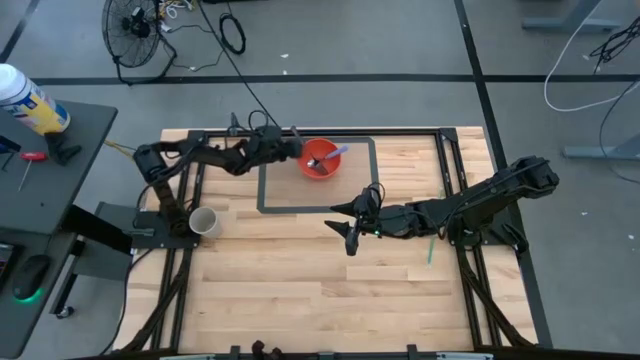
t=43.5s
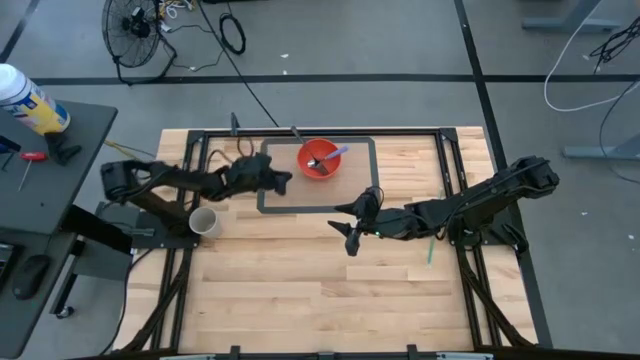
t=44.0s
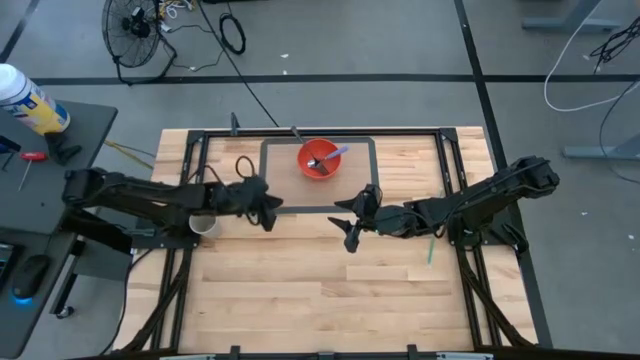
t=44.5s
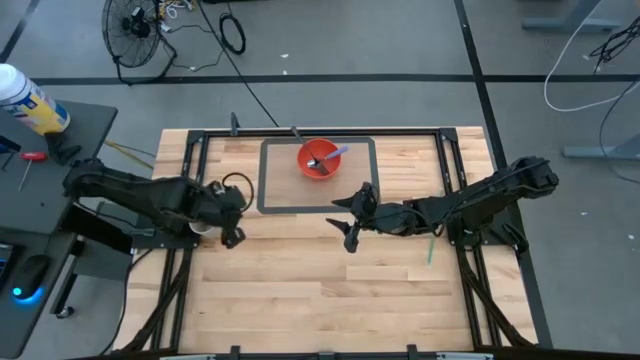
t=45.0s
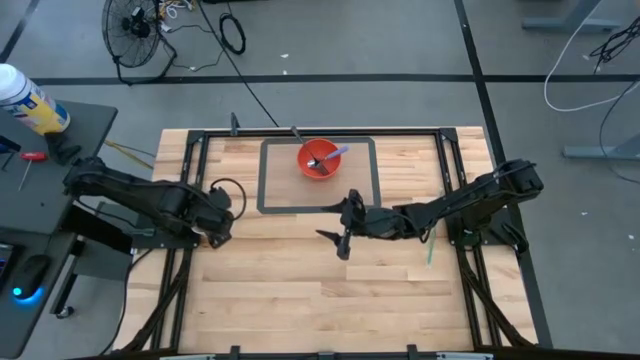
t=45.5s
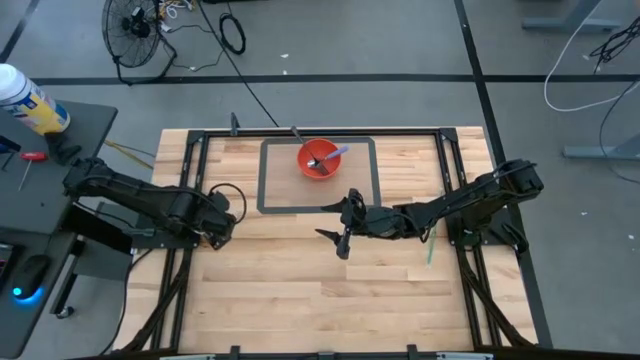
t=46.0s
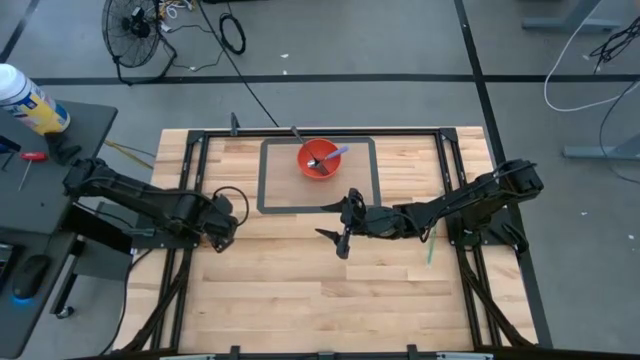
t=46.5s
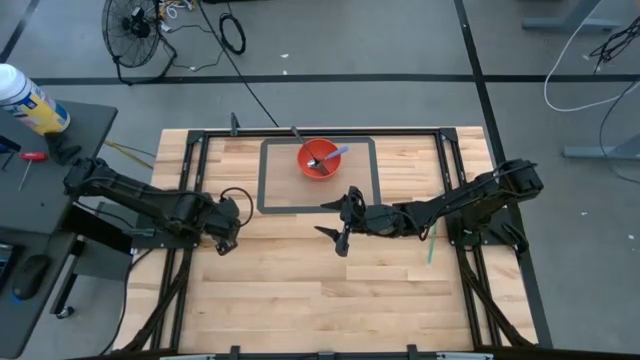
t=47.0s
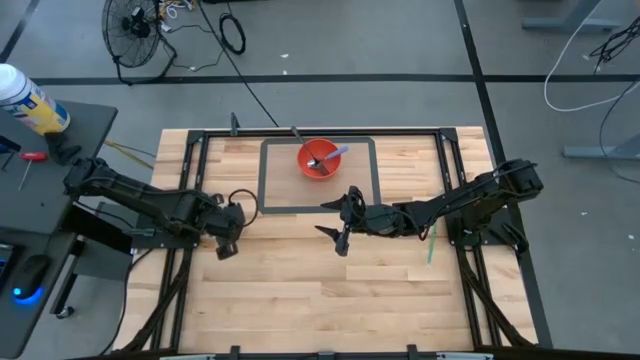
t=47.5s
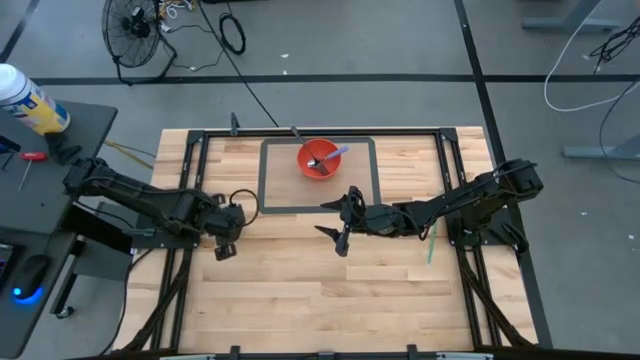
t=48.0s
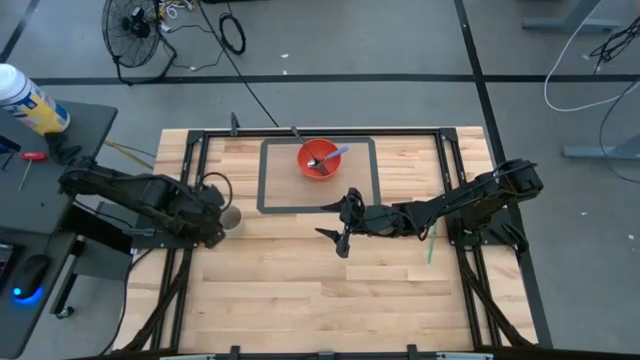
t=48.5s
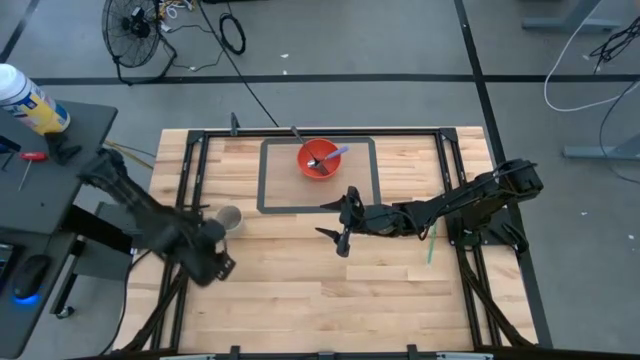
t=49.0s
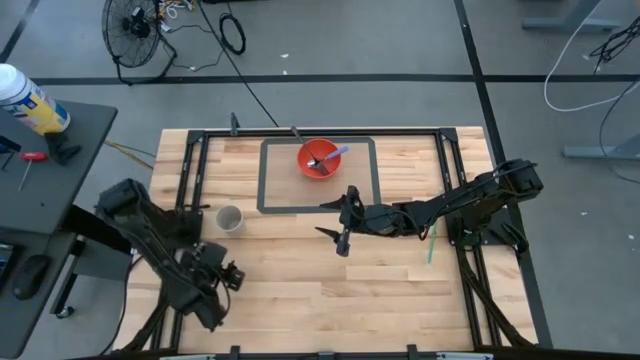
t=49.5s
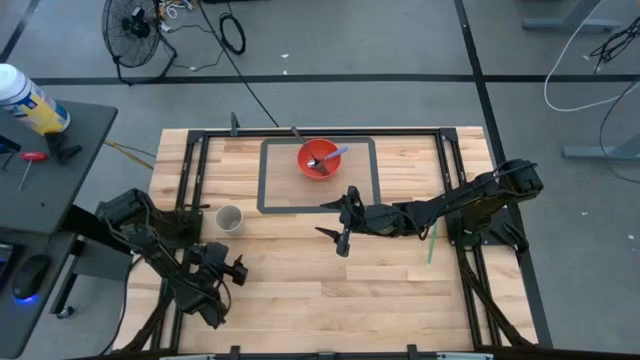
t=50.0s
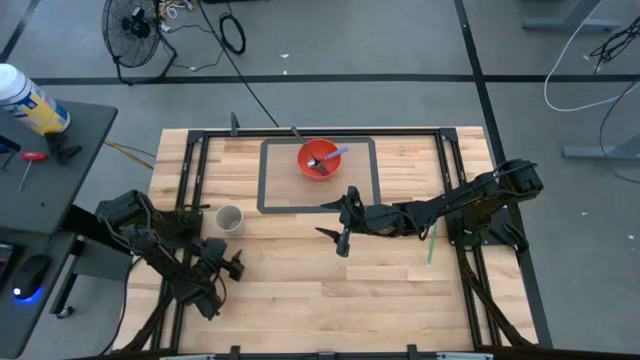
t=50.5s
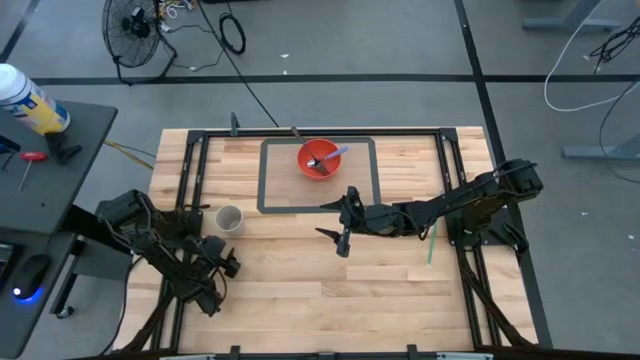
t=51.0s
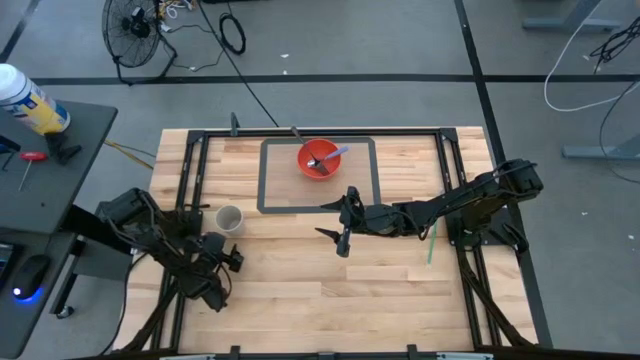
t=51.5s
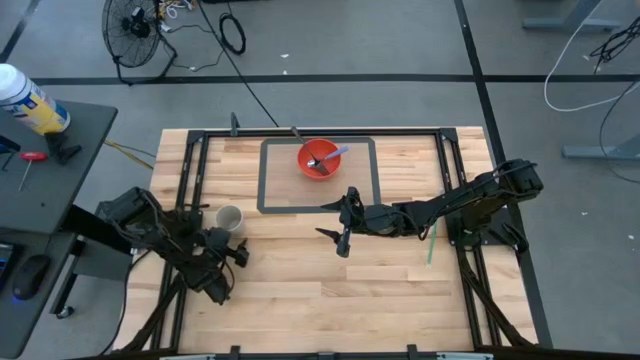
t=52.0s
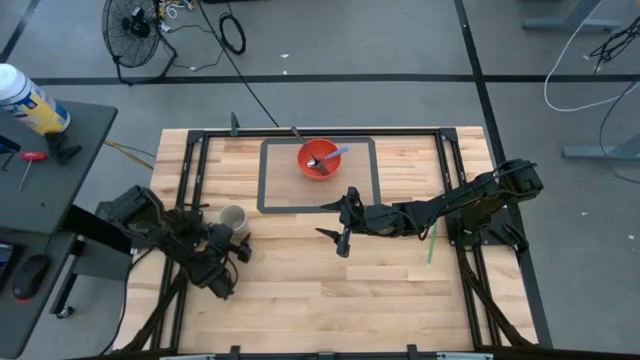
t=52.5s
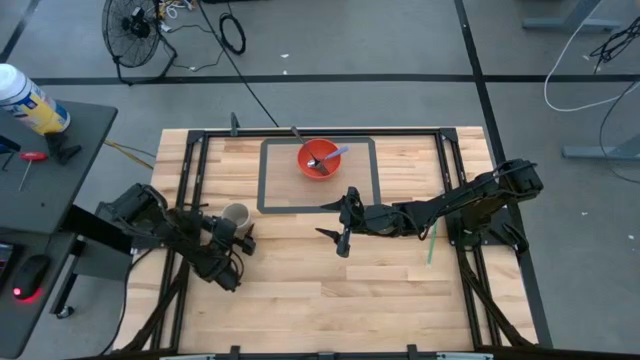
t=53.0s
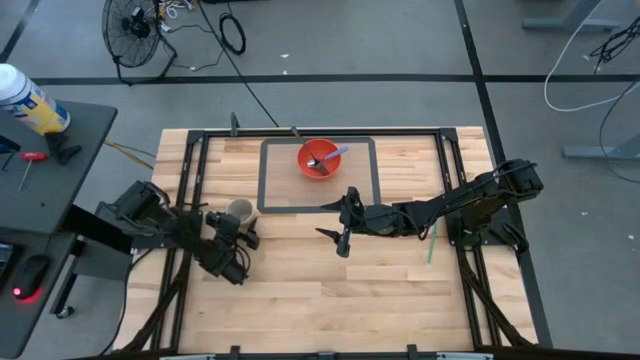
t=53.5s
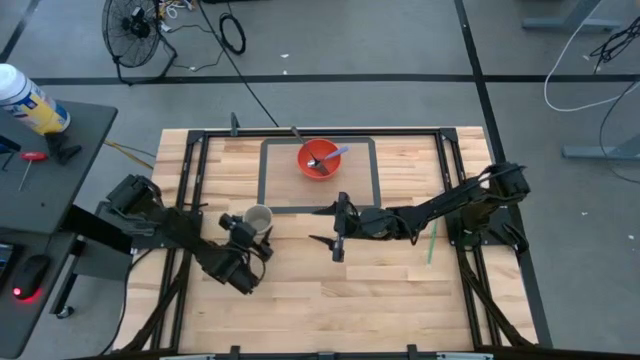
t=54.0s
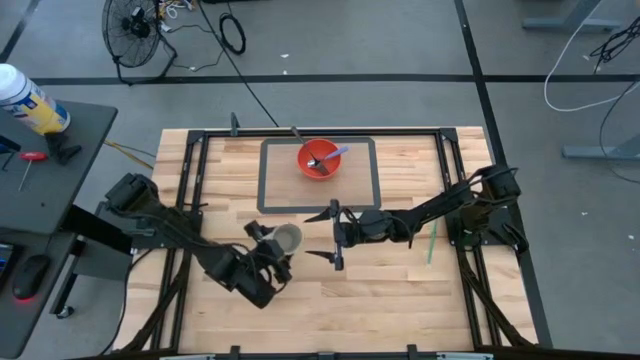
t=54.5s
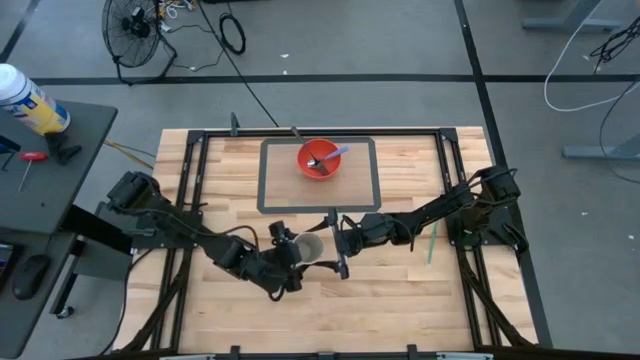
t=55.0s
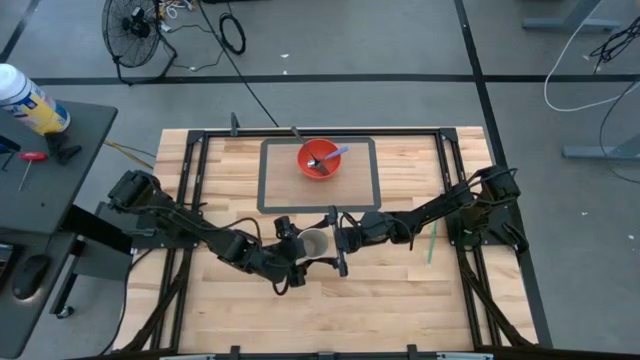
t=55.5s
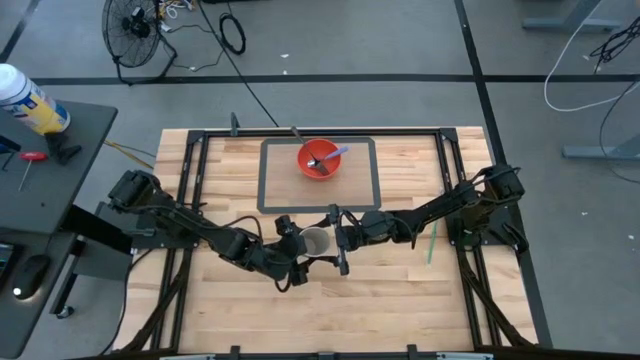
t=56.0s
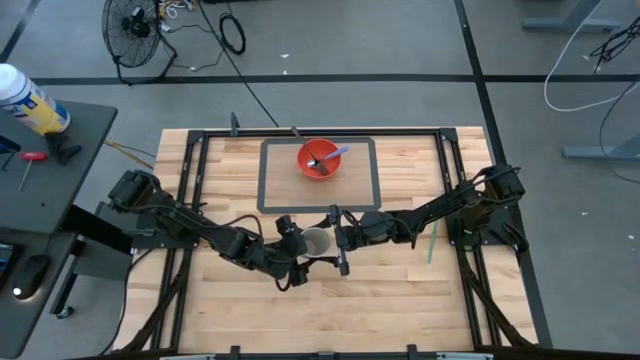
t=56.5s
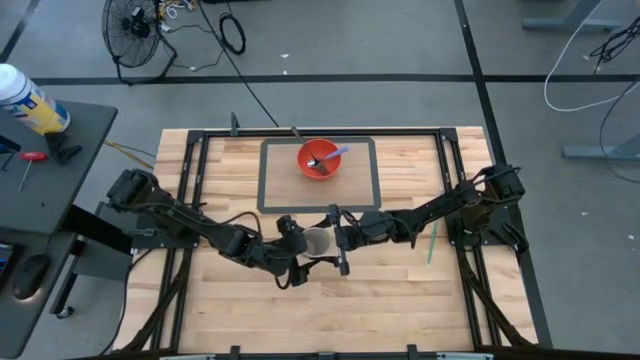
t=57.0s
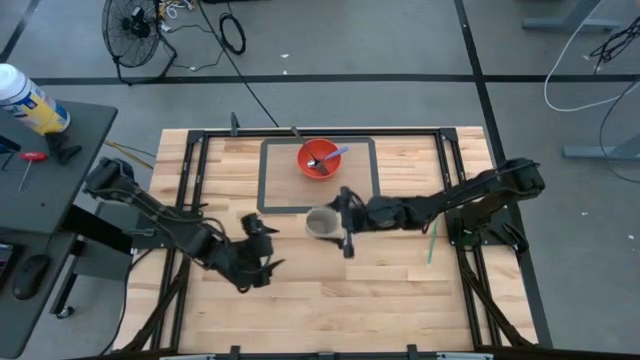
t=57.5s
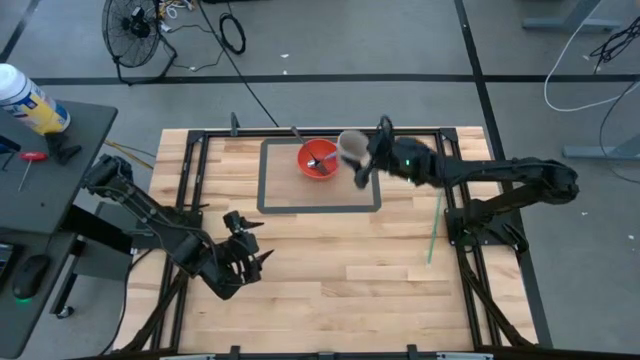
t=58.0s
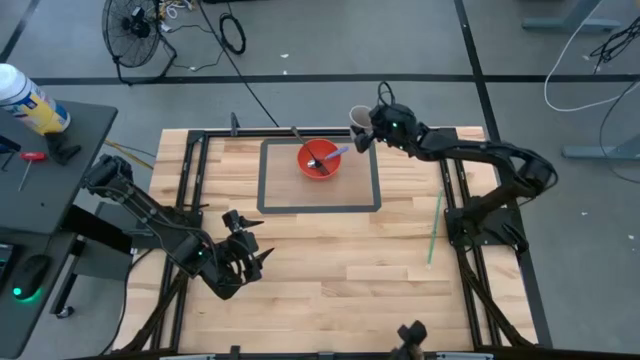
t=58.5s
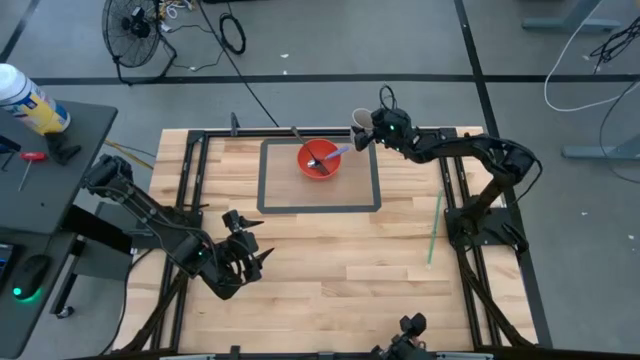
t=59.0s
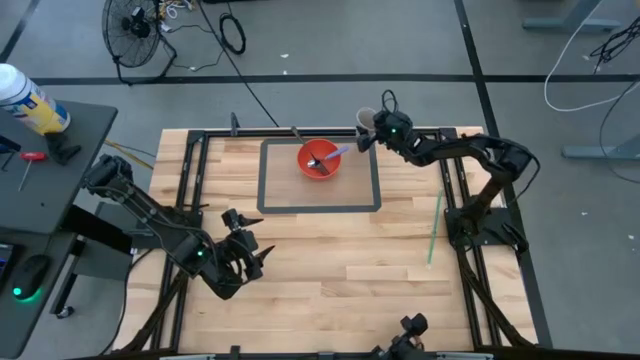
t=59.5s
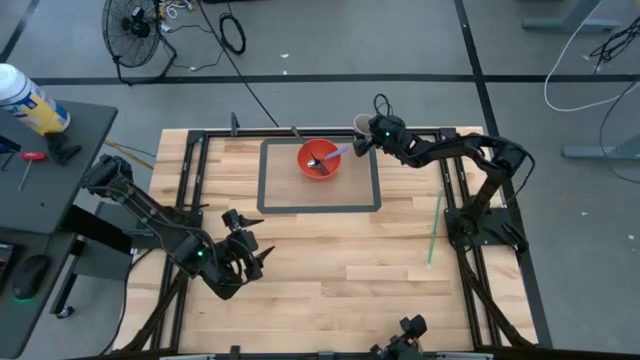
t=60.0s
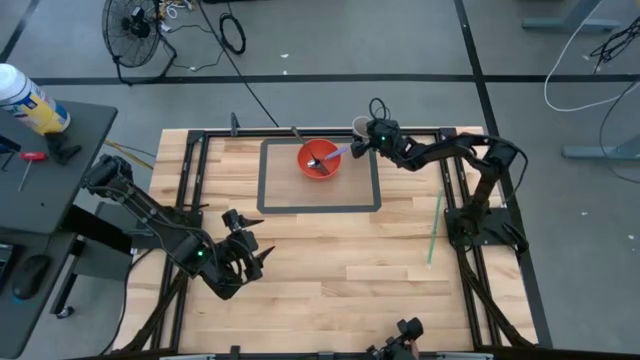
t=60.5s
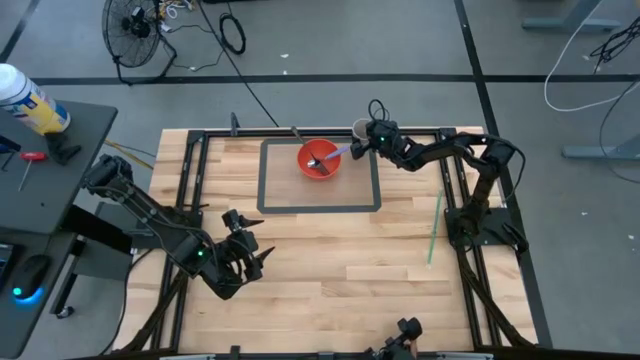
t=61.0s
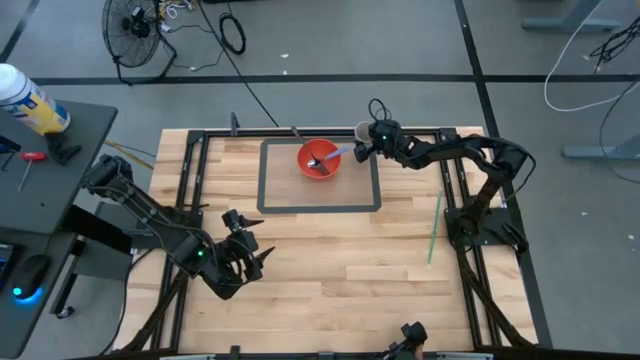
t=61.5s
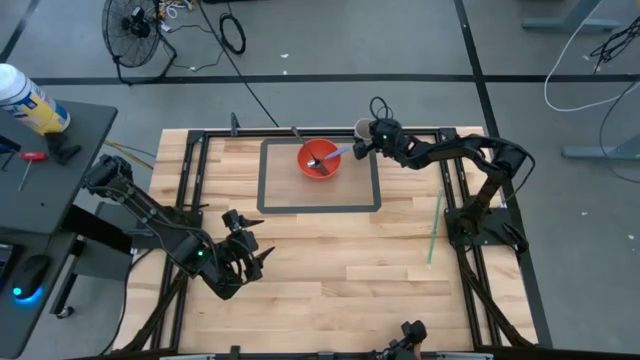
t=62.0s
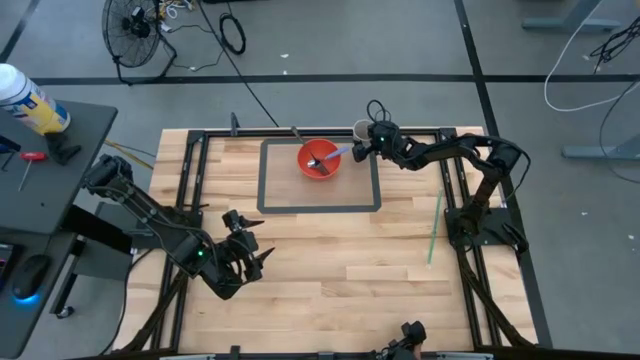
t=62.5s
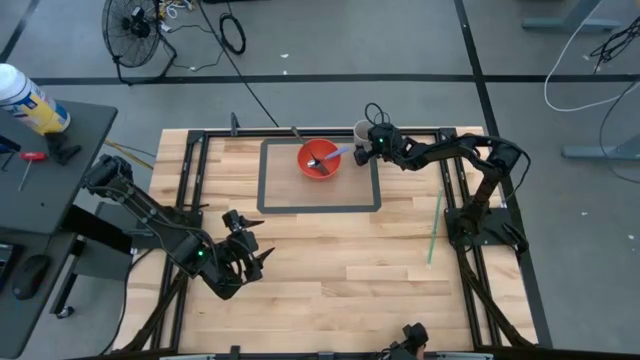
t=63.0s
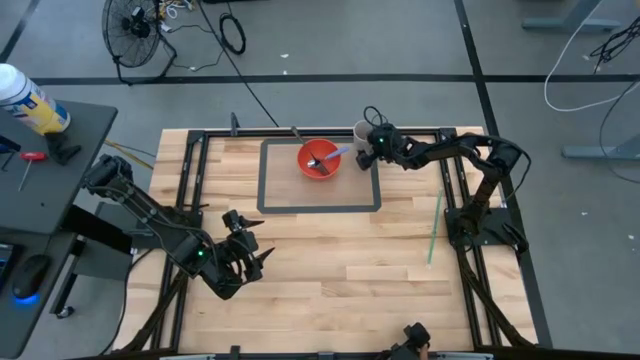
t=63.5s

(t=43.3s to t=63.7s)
Task: Pick & Place Utensil
Put the gray cup on the transparent mat to the top right of the orange bowl
